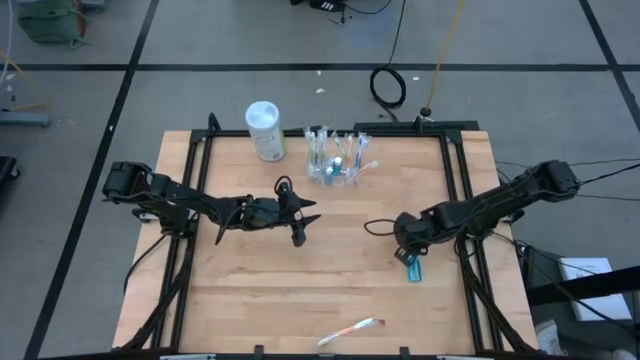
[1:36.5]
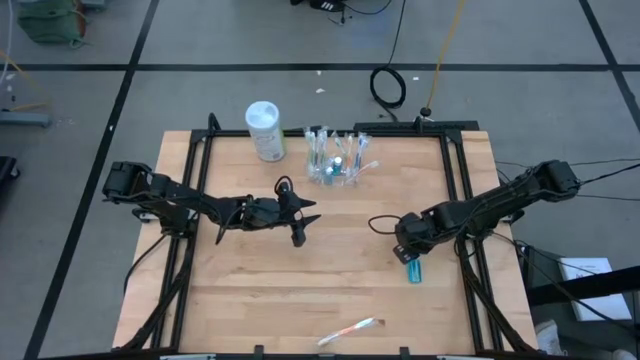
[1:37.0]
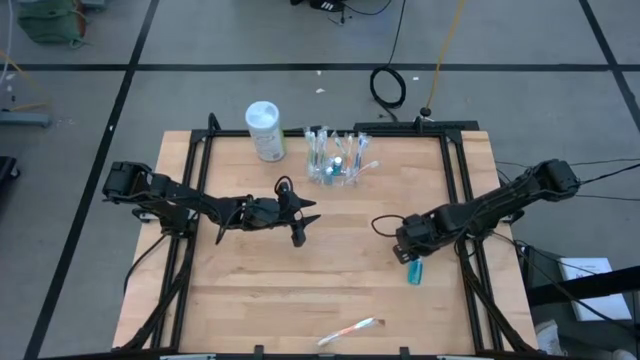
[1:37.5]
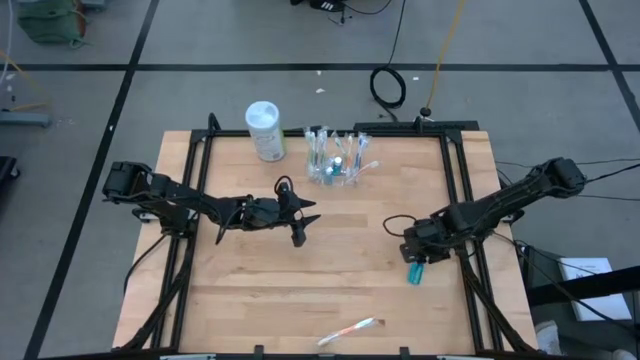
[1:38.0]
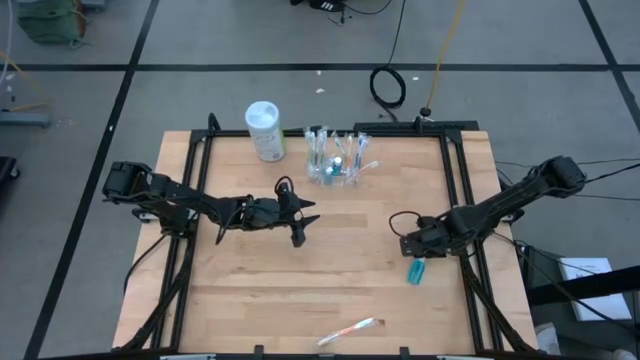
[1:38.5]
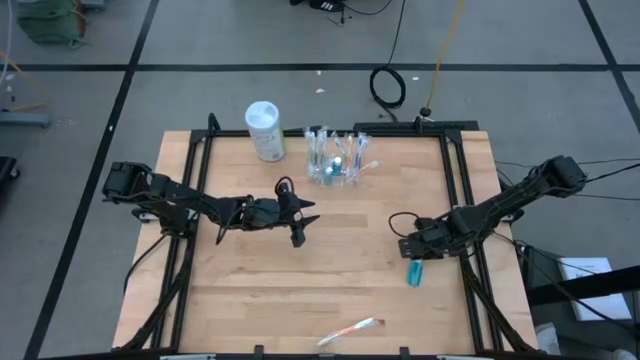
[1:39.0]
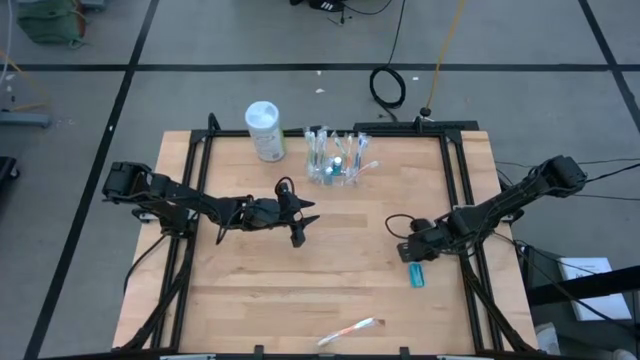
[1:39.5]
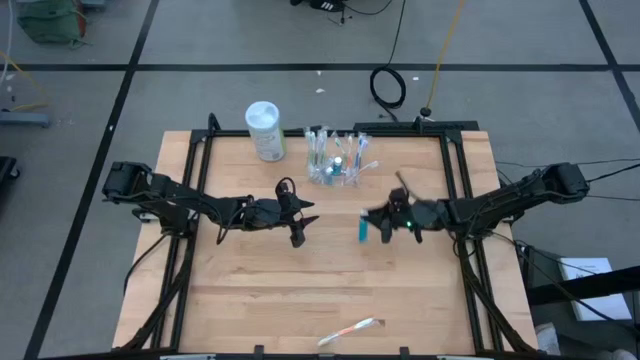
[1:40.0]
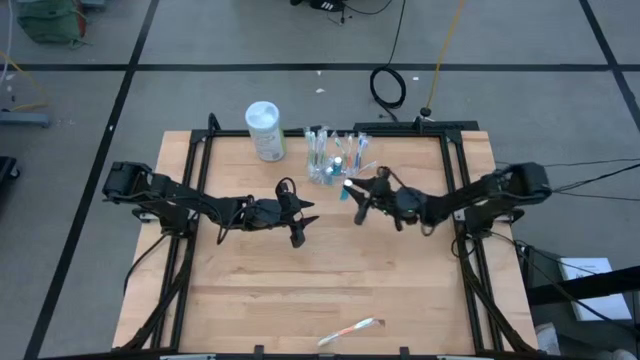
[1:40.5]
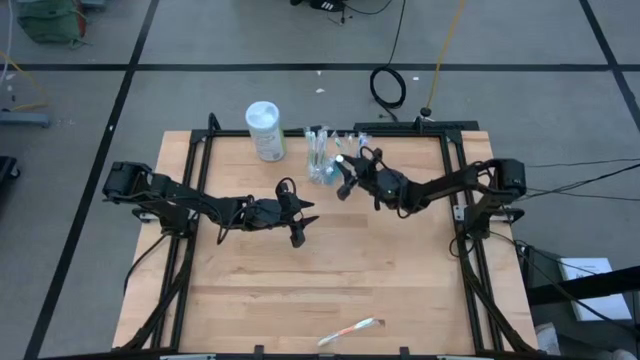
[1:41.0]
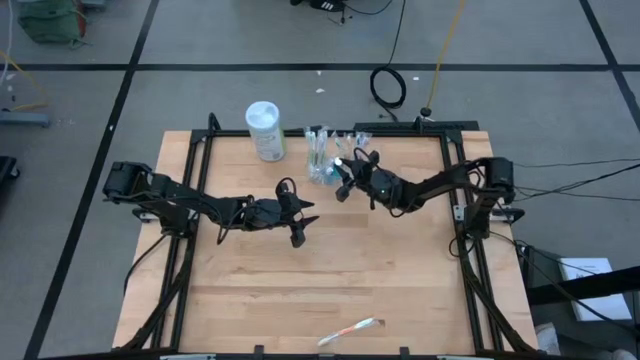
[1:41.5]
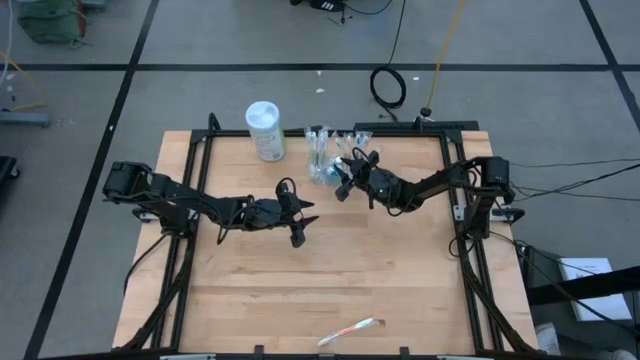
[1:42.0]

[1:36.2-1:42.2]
Task: Pick & Place toothbrushing station
Put the blue mouthwash into the transparent organizer

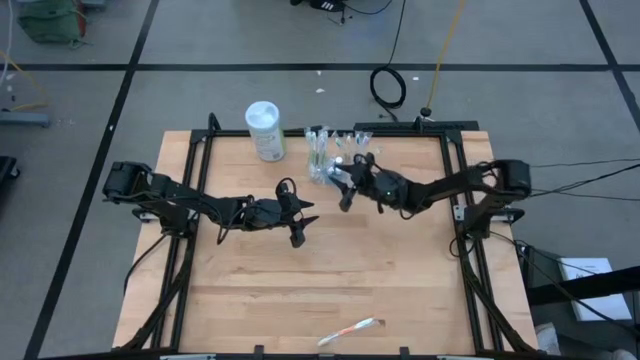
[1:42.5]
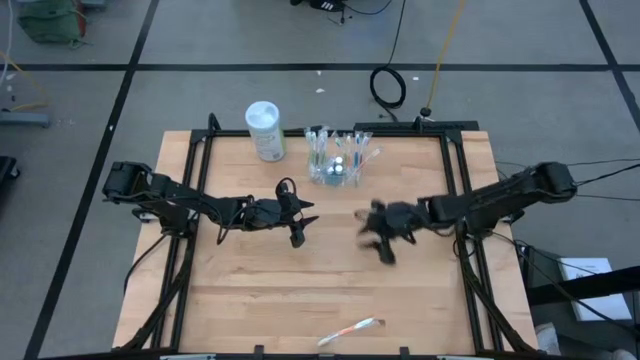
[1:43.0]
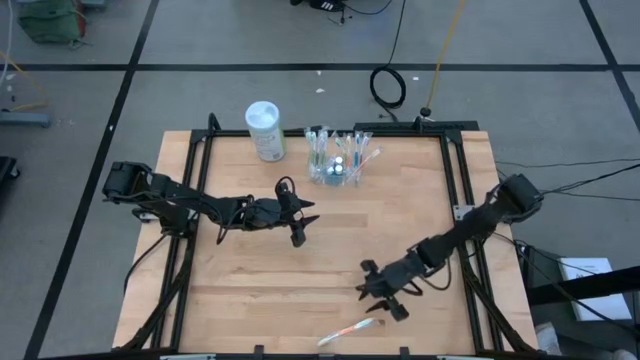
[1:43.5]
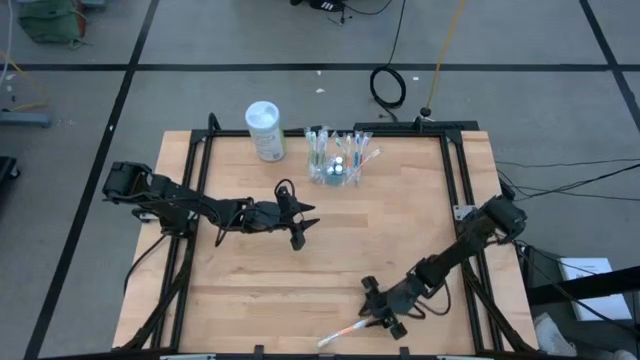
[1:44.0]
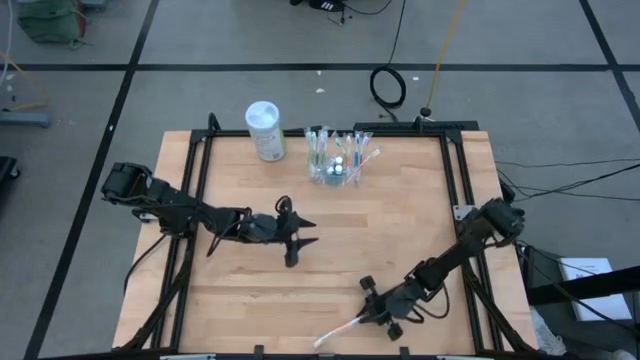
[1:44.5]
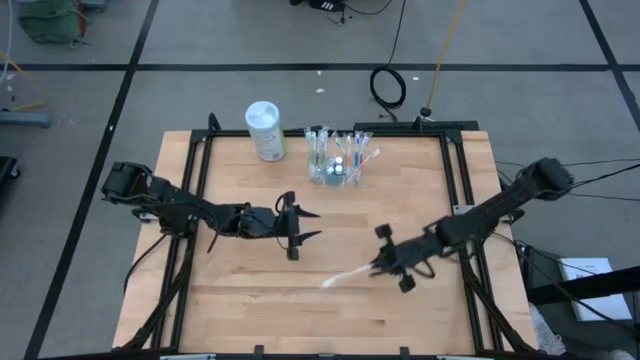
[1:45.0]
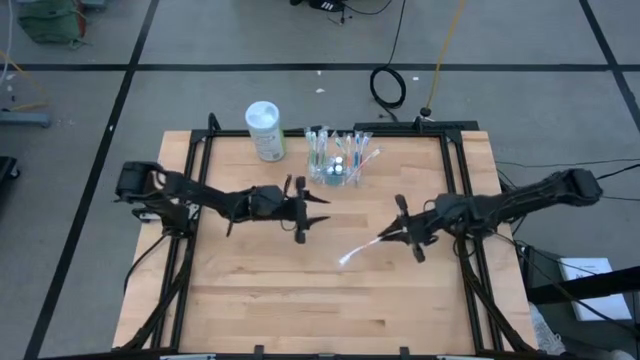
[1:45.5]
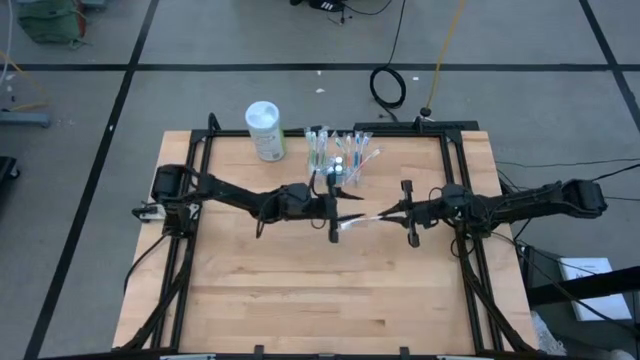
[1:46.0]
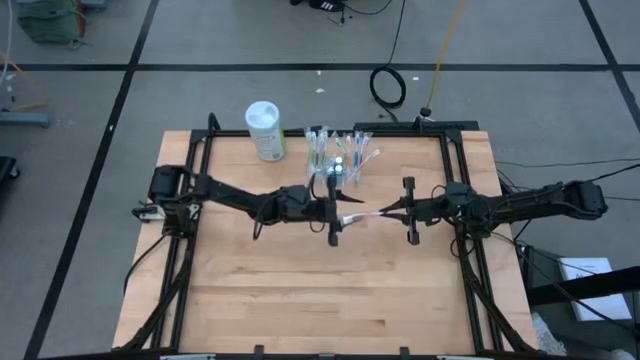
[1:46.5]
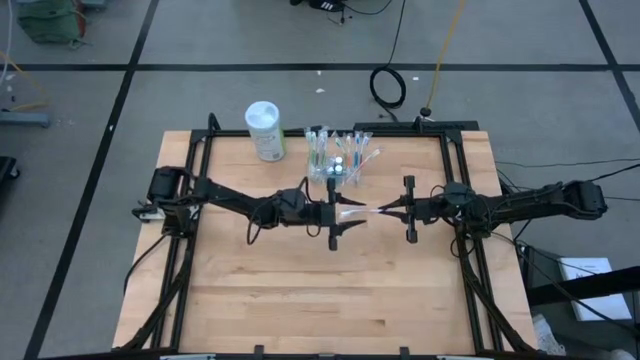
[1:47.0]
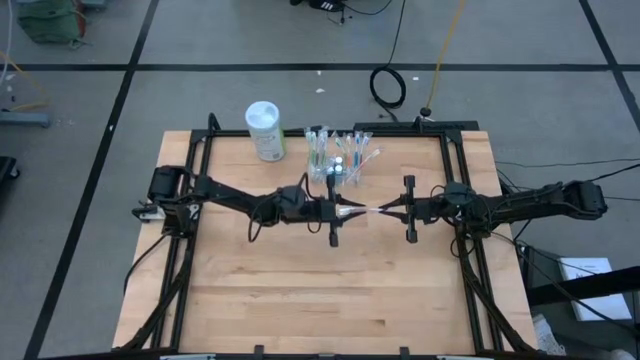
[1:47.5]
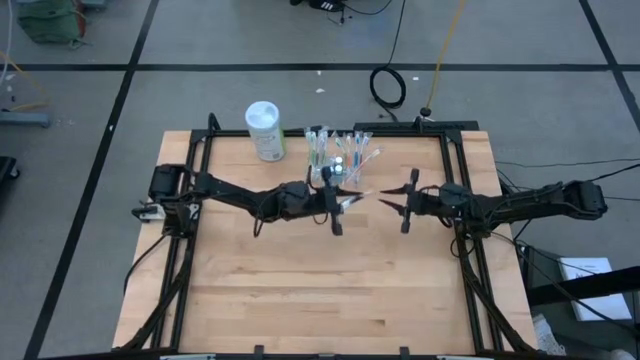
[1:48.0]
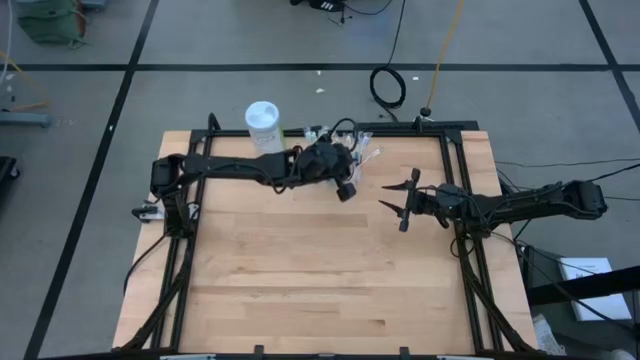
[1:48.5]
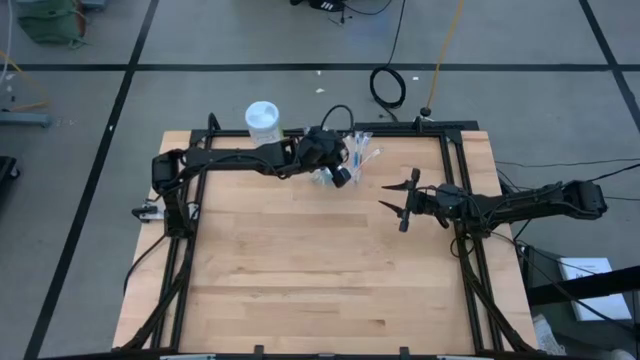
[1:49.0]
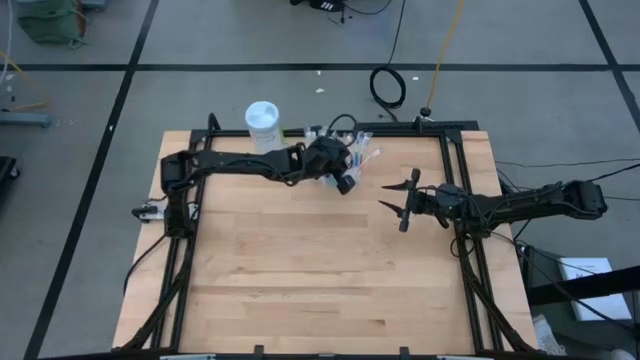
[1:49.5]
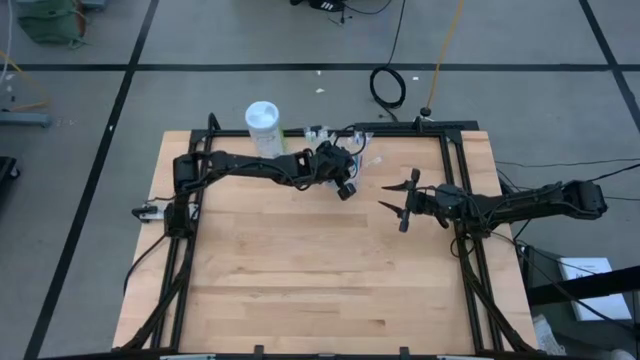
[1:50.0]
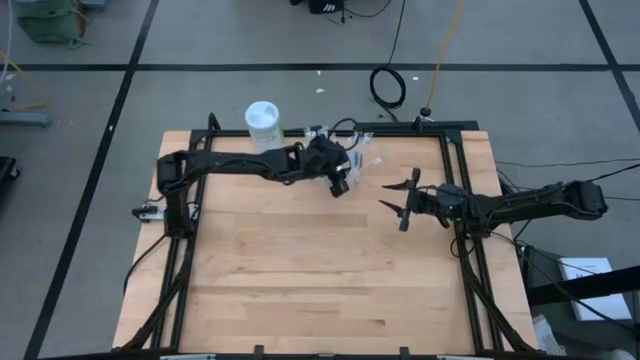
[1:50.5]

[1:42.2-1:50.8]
Put the orange toothbrush into the transparent organizer

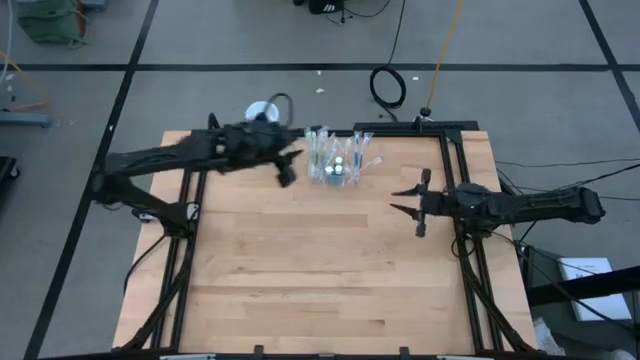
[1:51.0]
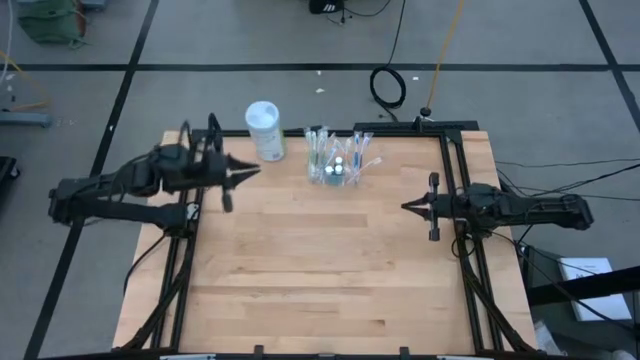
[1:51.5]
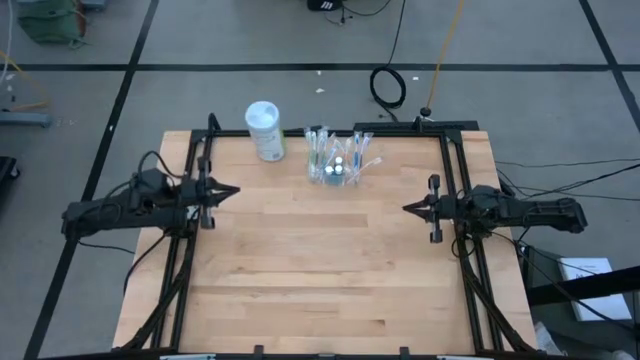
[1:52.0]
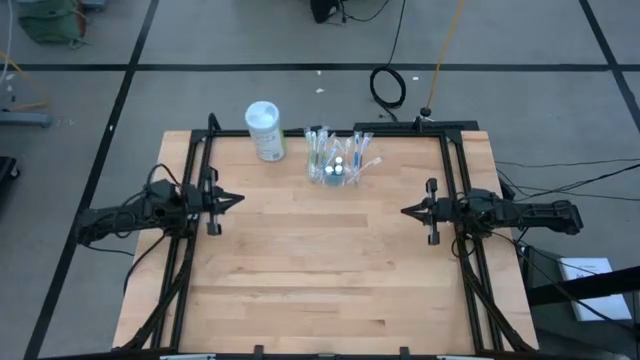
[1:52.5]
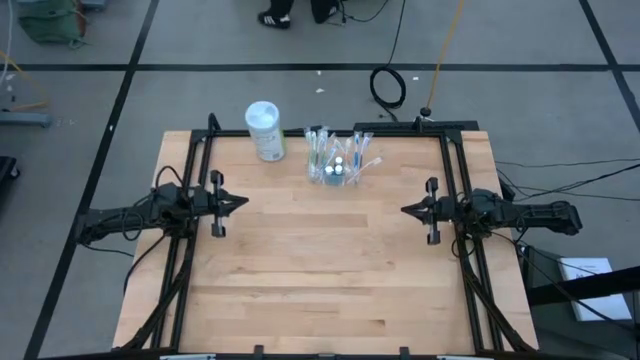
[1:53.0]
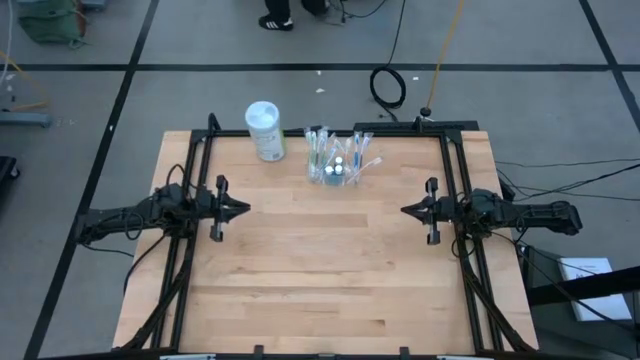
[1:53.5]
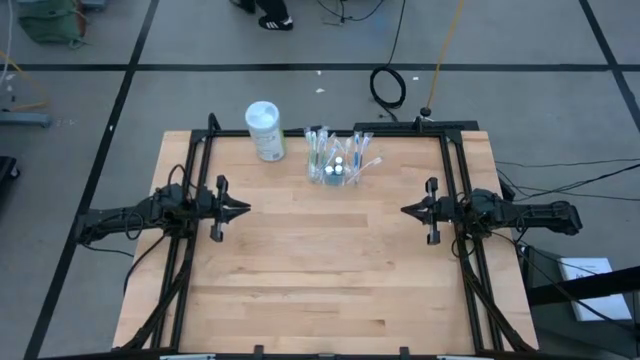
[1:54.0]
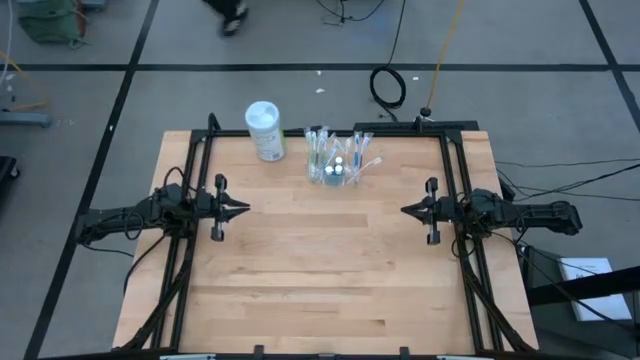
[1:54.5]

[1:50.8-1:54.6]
Return to Home Position

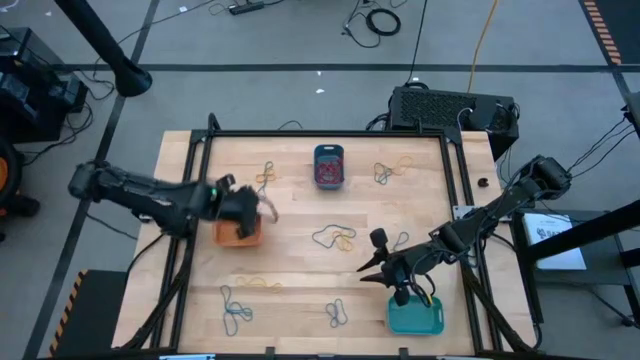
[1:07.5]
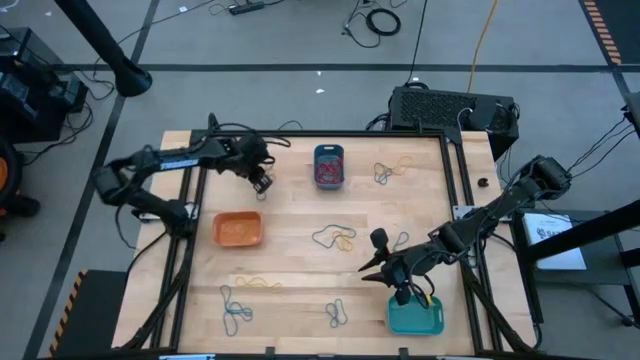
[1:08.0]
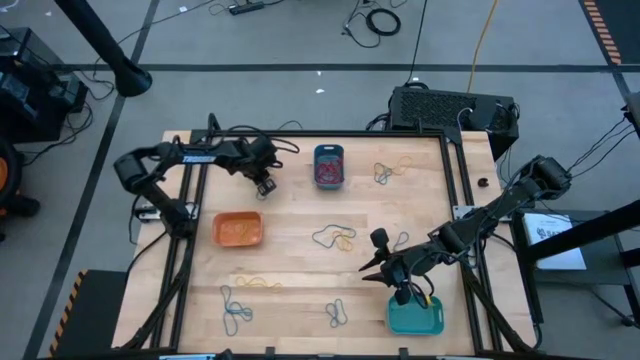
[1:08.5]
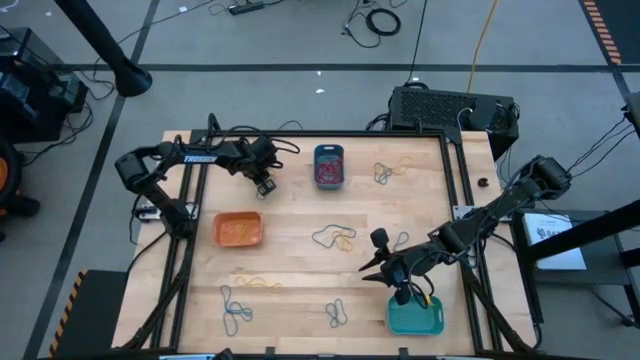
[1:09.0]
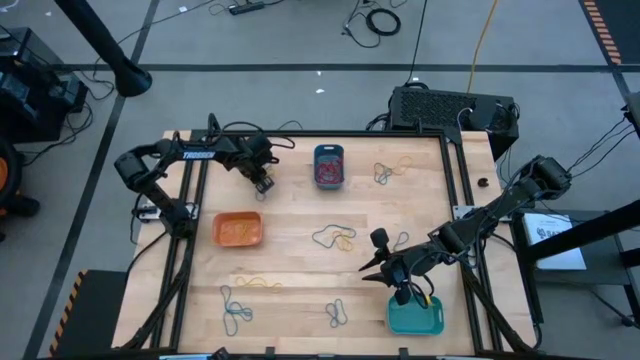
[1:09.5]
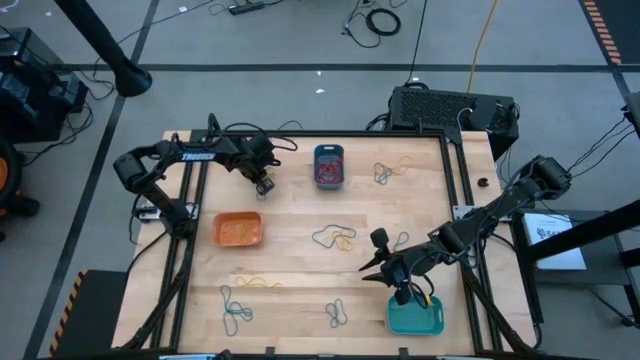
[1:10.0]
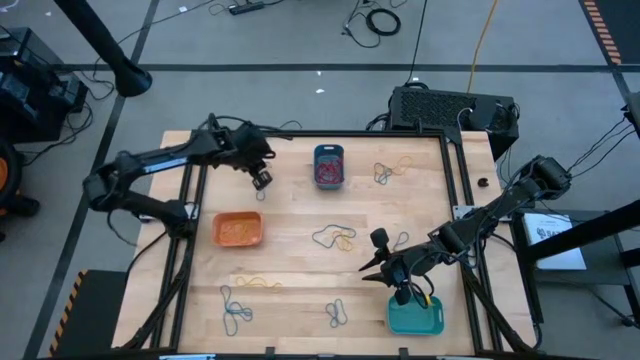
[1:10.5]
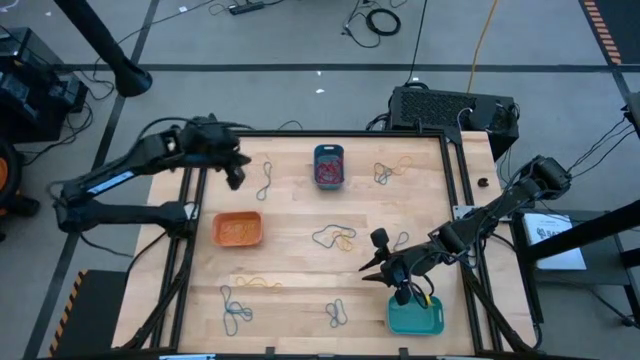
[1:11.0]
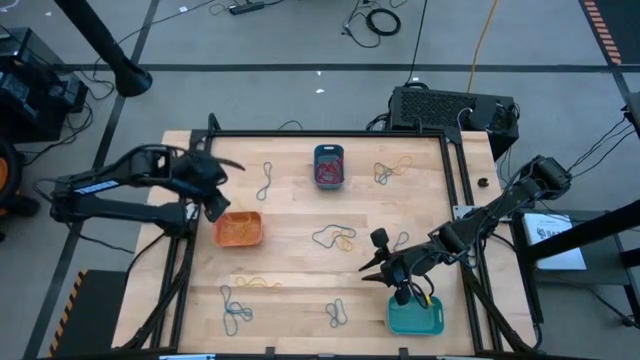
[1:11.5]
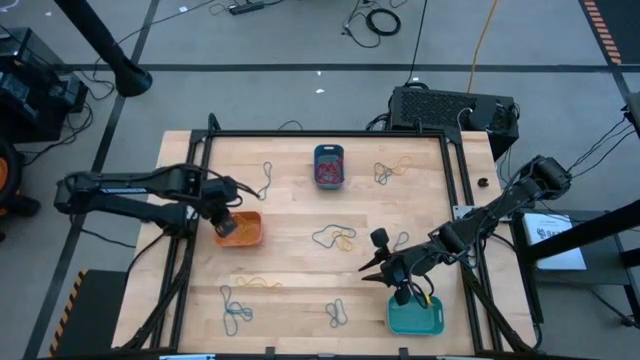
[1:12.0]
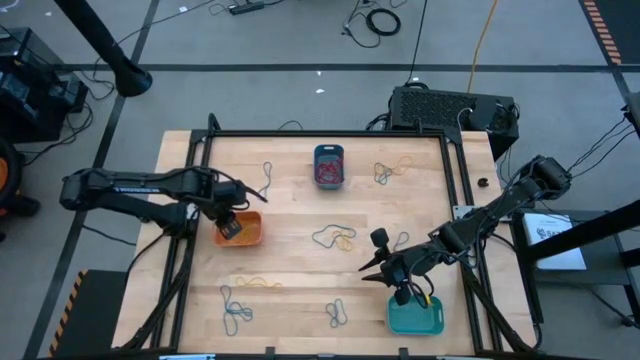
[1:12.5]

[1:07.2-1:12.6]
Task: Sort rubber bands into baskets
Put the top left yellow rubber band into the orange bin
